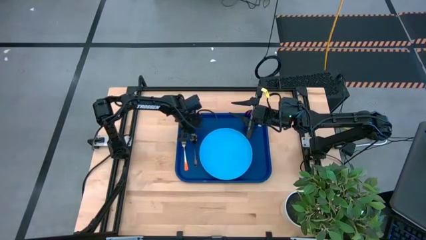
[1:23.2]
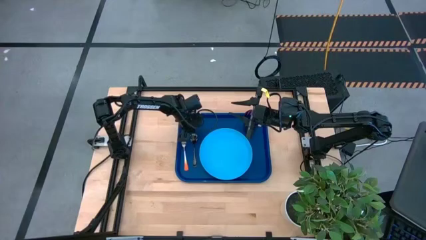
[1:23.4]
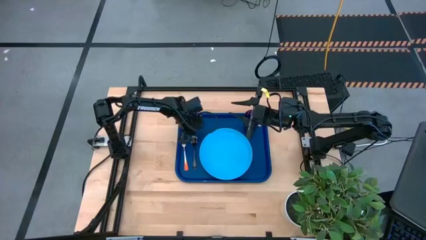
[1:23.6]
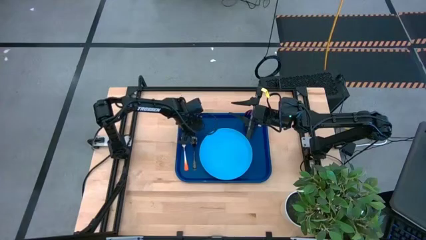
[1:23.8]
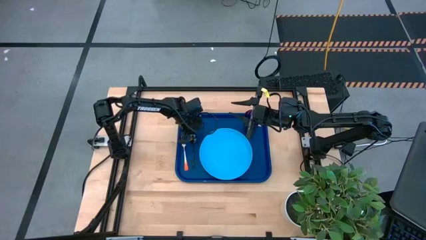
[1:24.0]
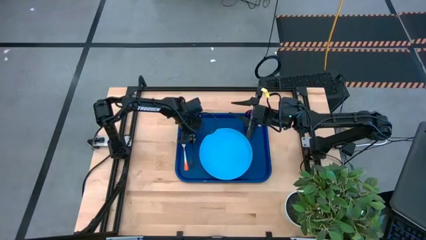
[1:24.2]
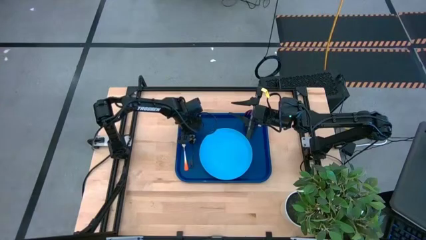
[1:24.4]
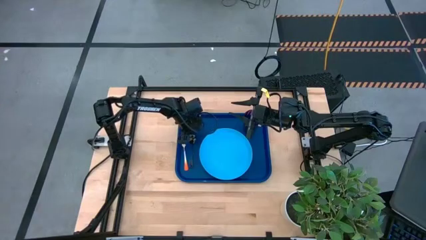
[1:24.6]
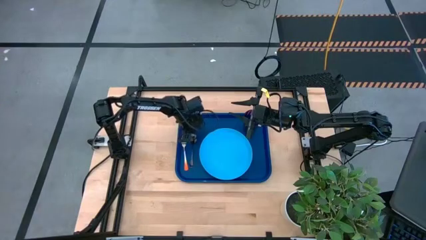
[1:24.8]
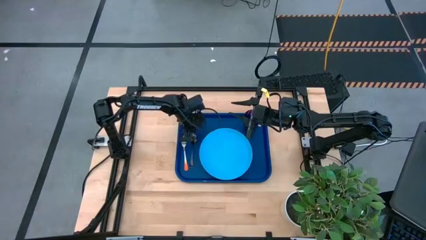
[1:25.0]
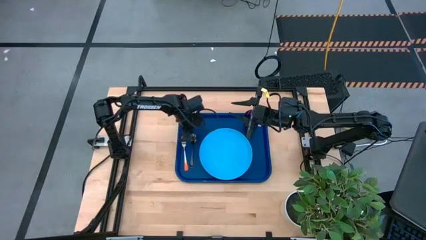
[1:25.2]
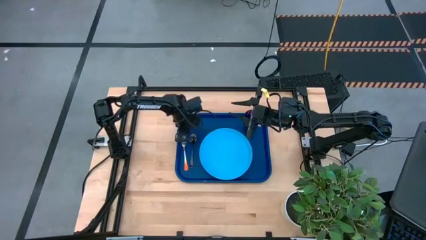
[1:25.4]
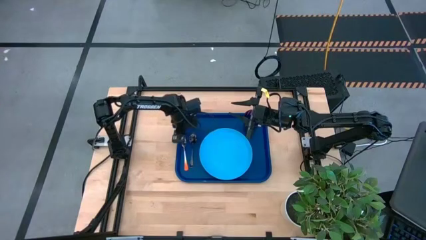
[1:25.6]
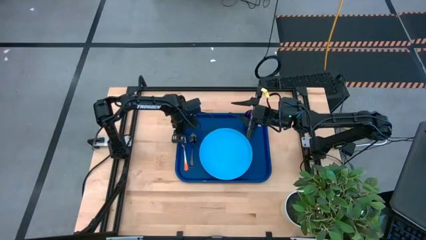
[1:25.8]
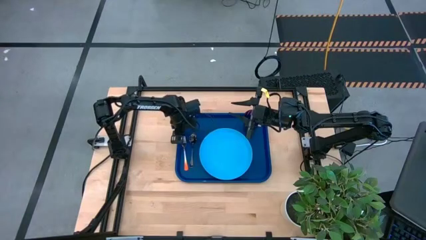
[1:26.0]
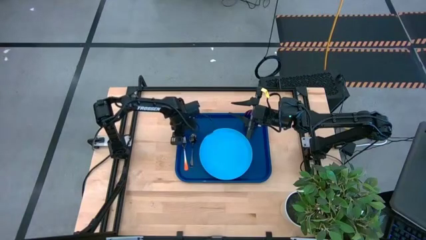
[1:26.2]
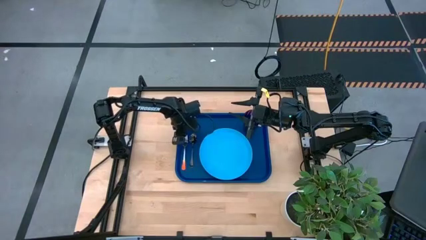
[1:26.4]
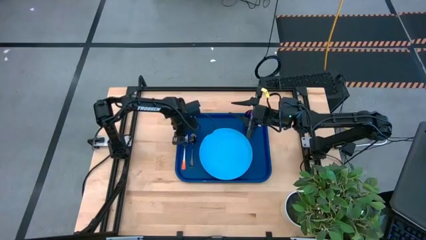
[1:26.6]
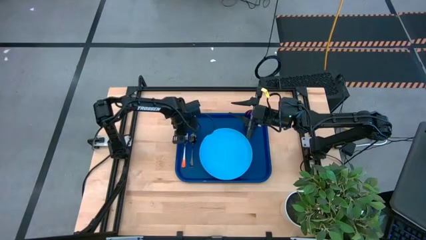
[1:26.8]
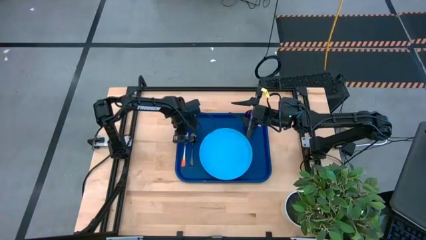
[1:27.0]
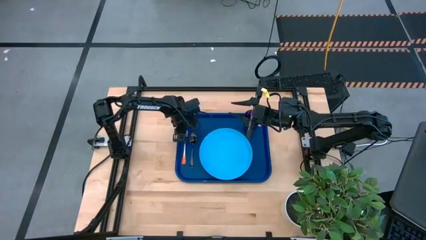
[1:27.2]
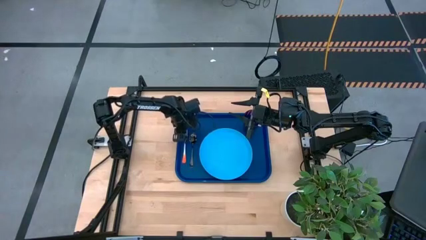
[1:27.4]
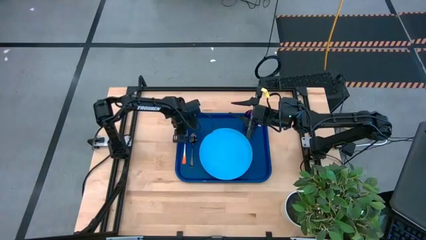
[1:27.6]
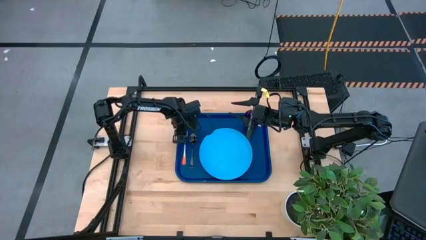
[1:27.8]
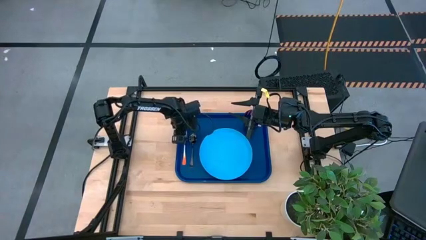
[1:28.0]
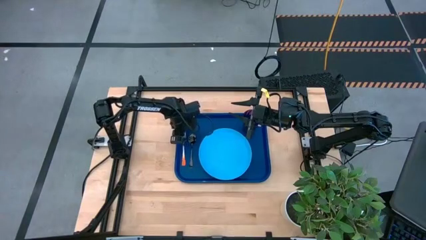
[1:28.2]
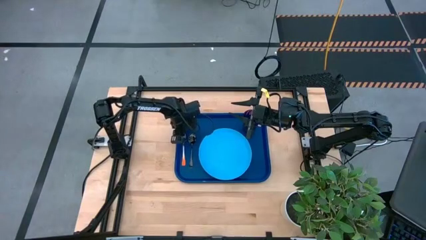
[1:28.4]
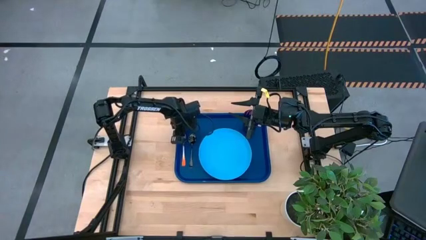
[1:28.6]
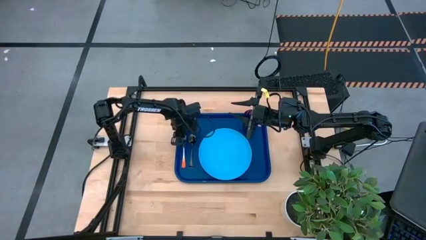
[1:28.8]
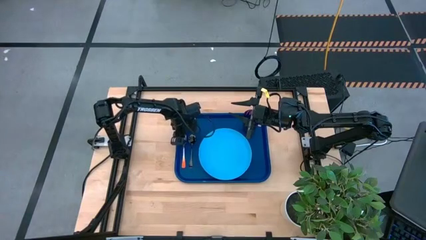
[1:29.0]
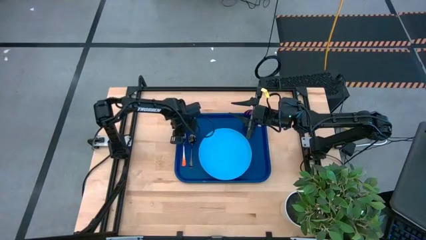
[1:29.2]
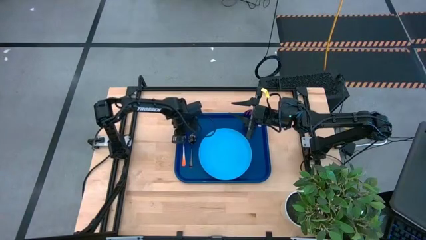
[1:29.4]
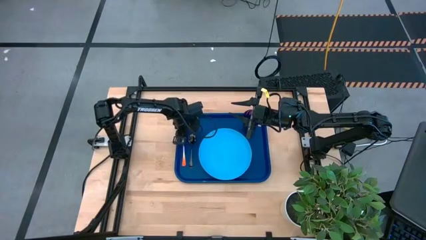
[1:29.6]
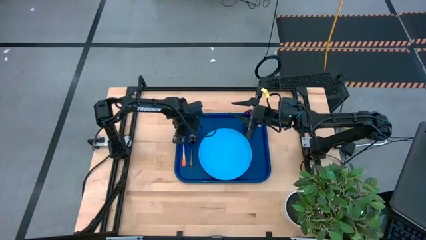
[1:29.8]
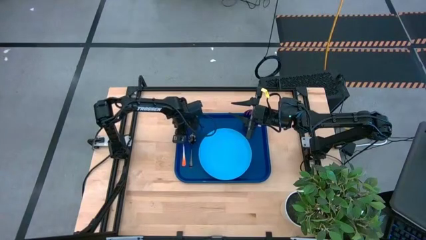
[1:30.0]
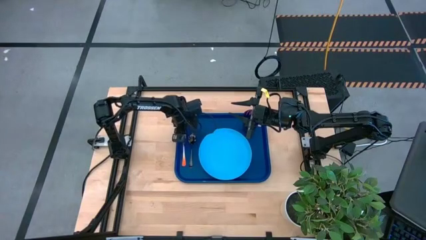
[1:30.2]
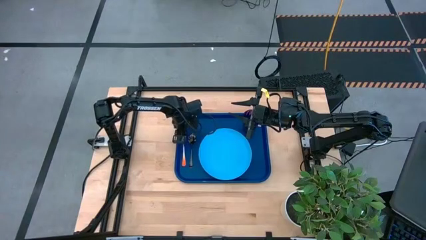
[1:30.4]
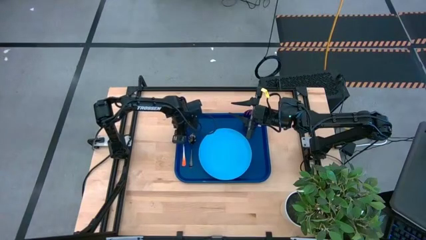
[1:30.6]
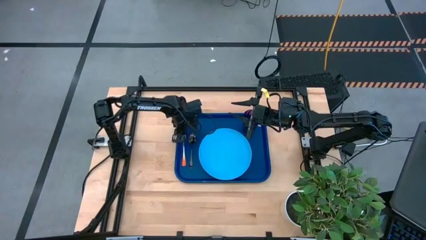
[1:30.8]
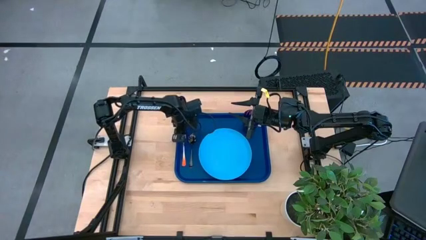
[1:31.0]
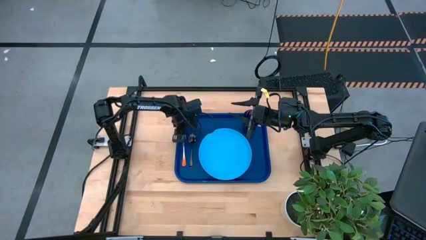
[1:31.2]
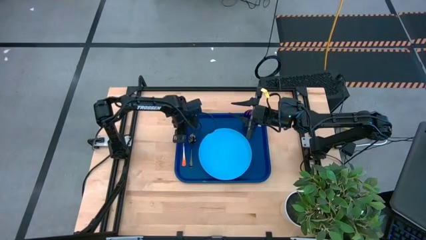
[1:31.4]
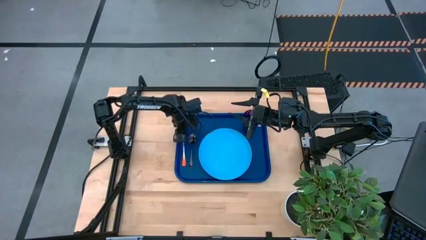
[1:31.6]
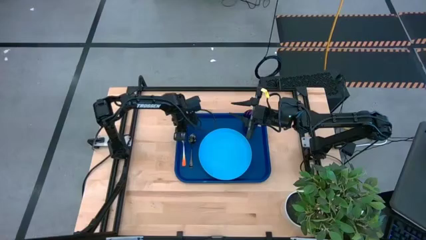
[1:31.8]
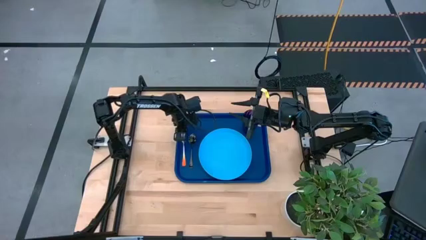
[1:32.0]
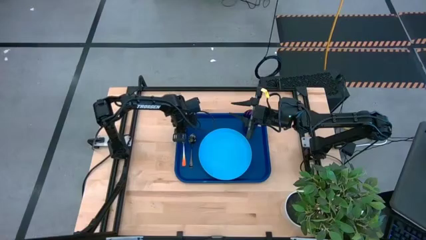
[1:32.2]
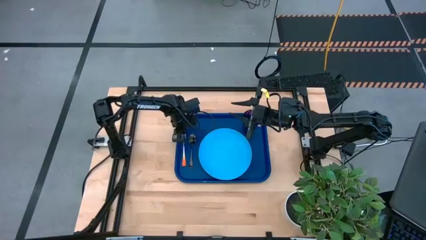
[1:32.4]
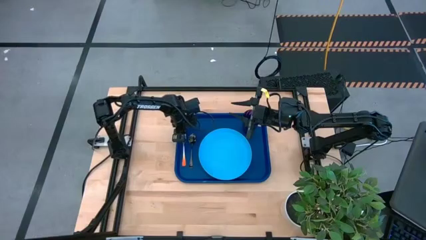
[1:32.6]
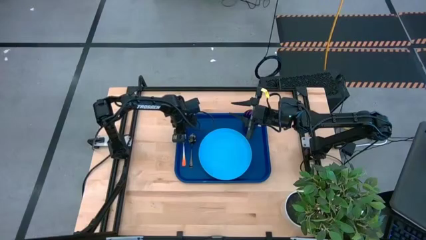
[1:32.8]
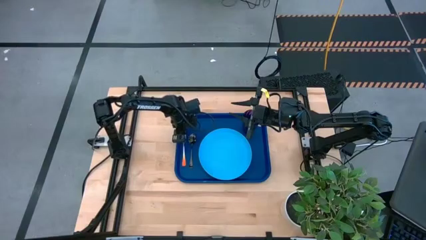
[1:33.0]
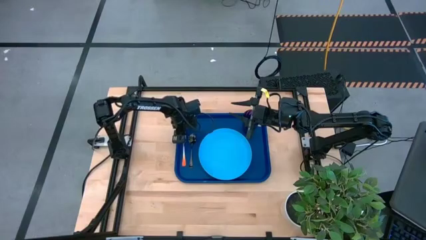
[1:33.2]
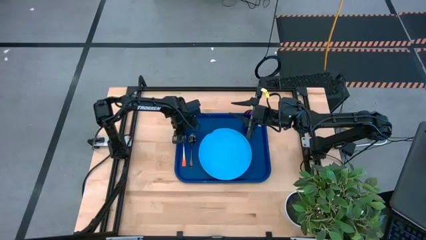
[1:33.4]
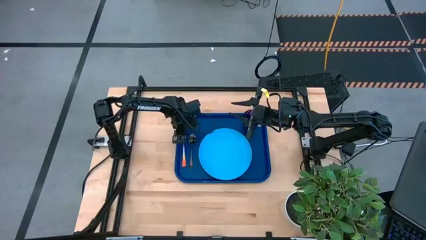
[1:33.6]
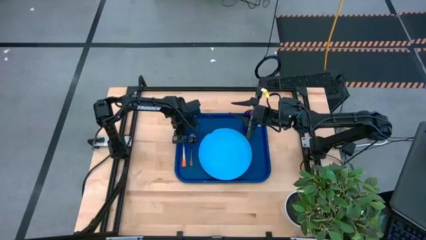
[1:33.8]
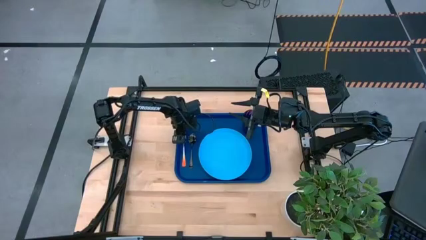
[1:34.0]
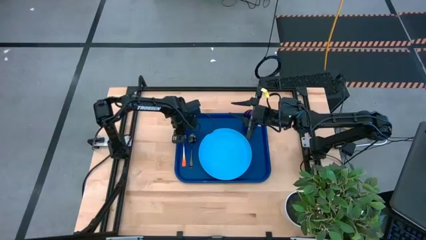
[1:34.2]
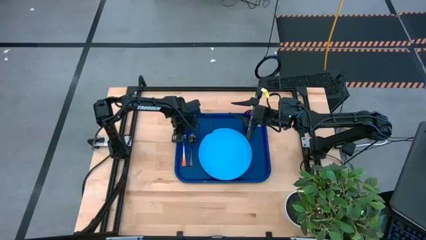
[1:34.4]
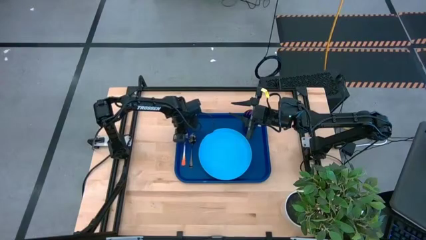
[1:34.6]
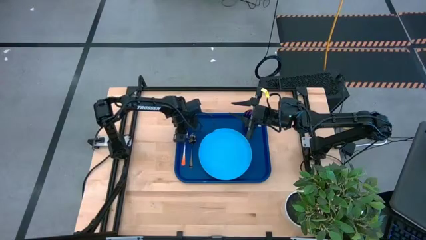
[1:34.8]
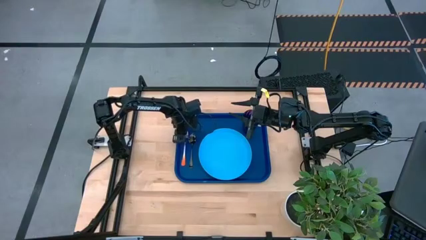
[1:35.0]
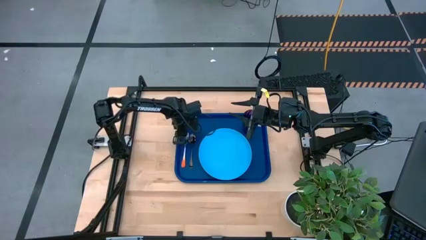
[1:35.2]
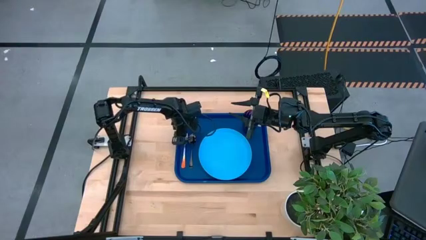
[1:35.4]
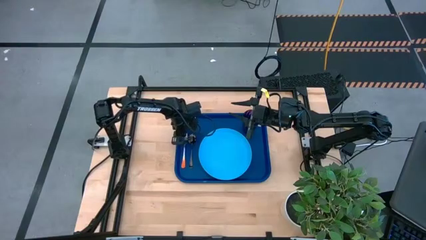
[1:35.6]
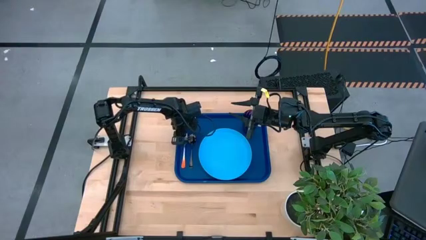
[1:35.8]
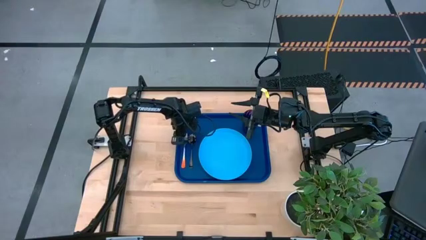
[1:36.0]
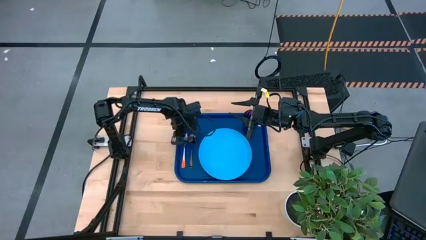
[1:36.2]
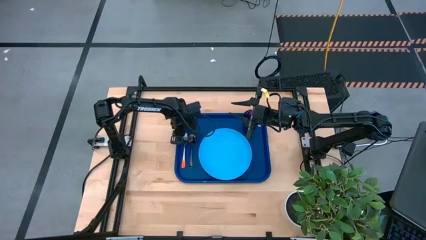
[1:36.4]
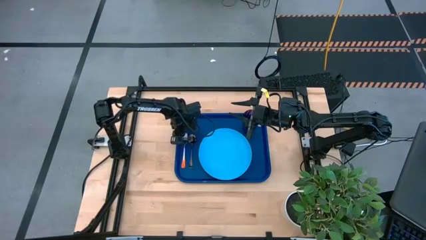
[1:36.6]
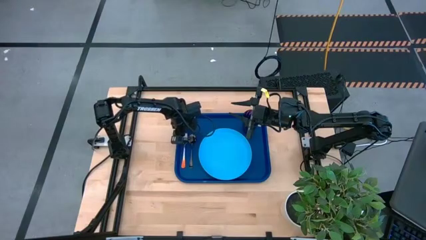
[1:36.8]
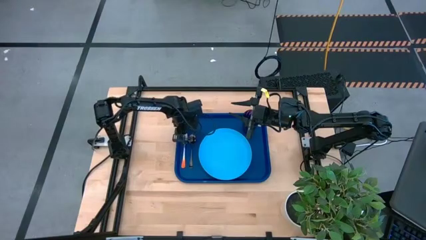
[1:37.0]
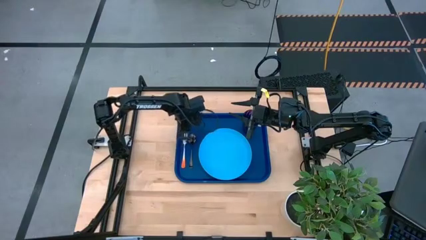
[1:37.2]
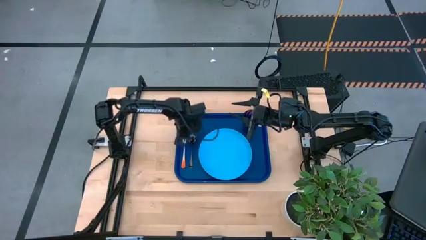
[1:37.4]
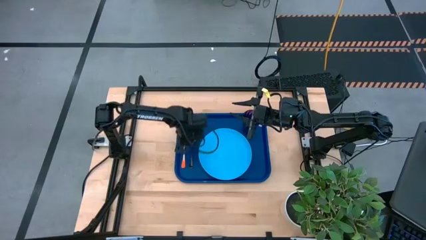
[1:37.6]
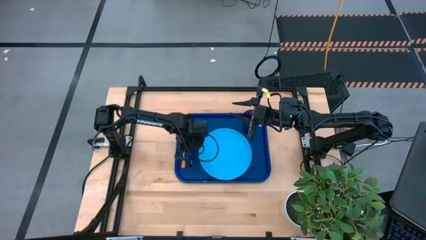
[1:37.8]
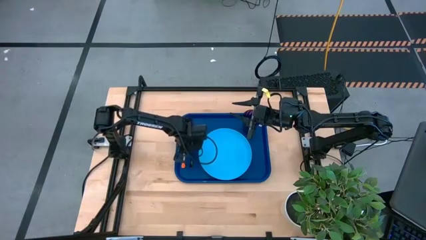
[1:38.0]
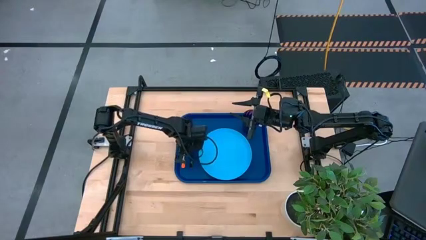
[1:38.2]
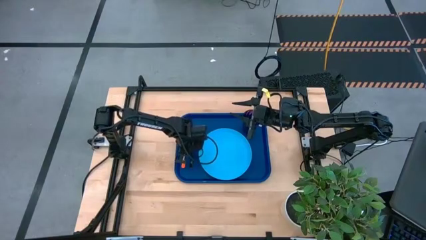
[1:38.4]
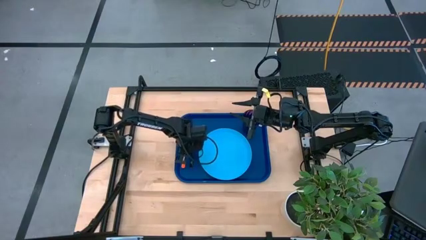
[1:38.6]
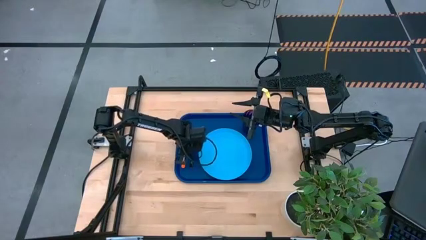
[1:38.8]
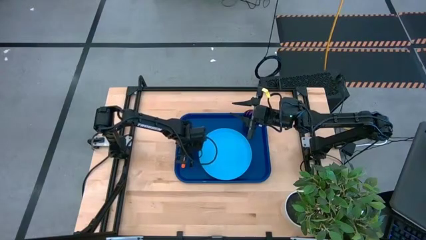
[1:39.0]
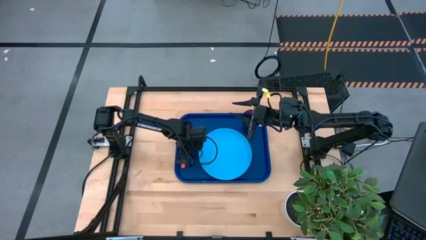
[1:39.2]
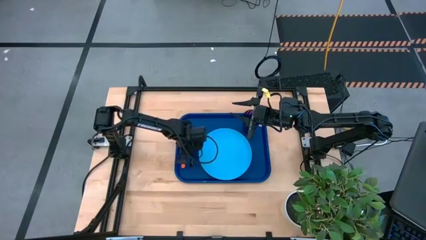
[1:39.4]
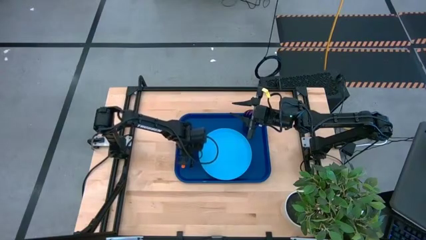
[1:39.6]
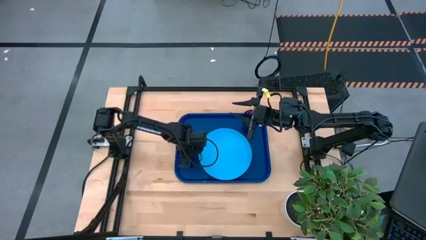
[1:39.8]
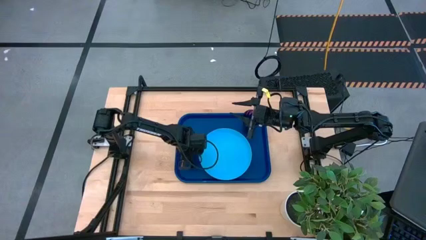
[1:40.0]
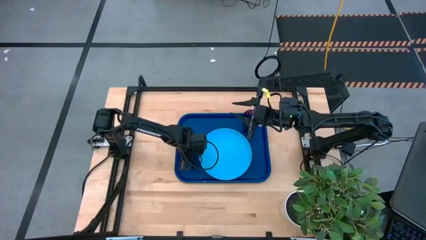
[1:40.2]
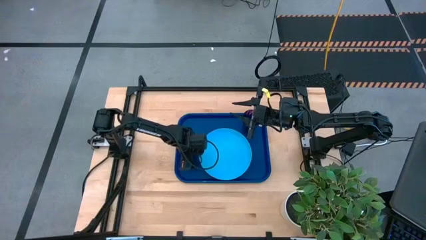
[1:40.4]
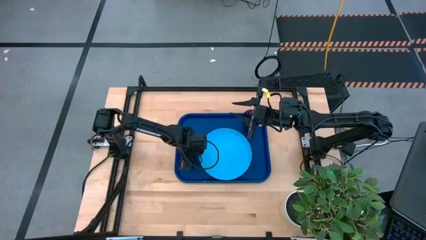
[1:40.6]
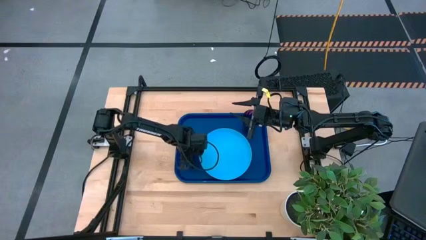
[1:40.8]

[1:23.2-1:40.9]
Task: Pick and place plate/cup/fork/spoon on tray
Adjust the blue fork and black spoon on the blue serving tray
